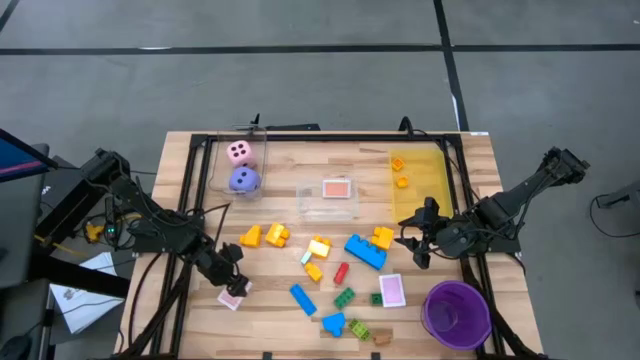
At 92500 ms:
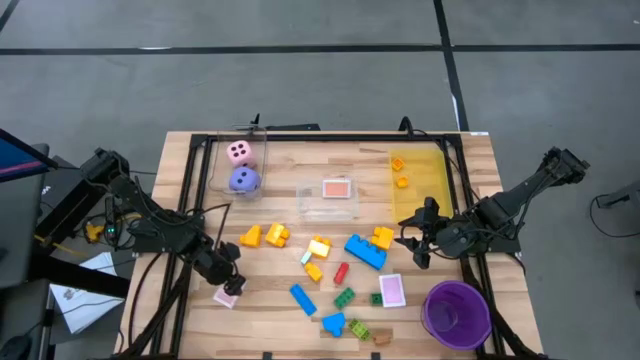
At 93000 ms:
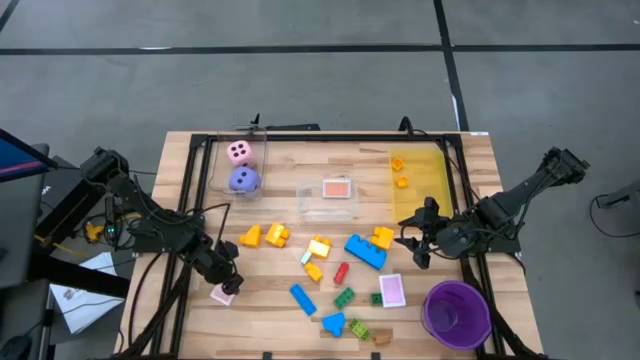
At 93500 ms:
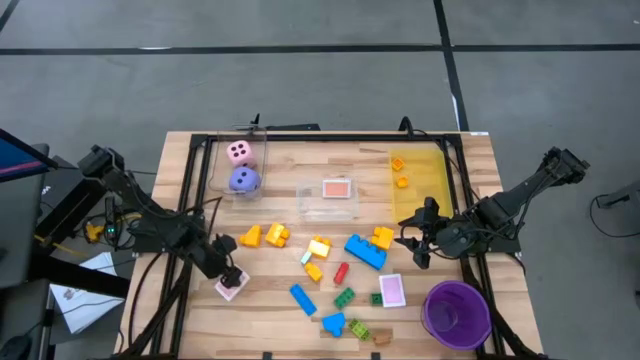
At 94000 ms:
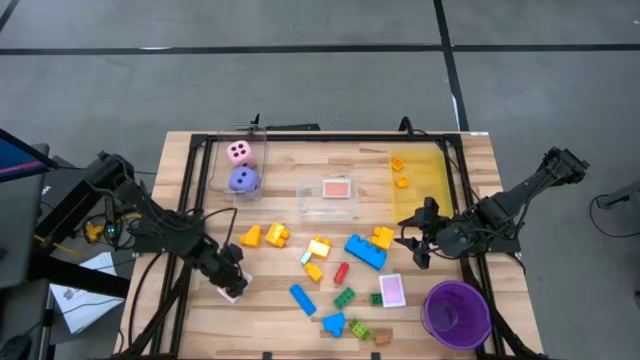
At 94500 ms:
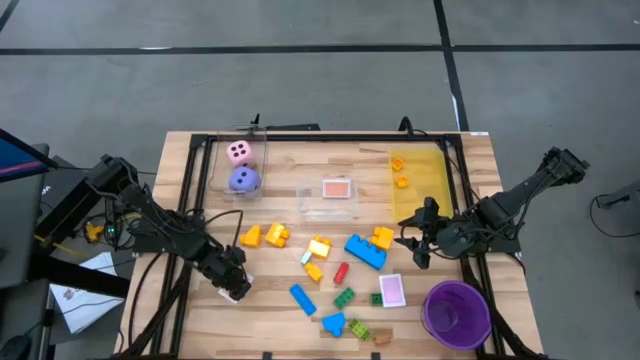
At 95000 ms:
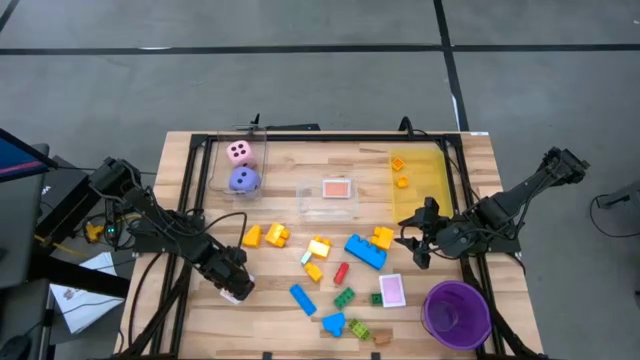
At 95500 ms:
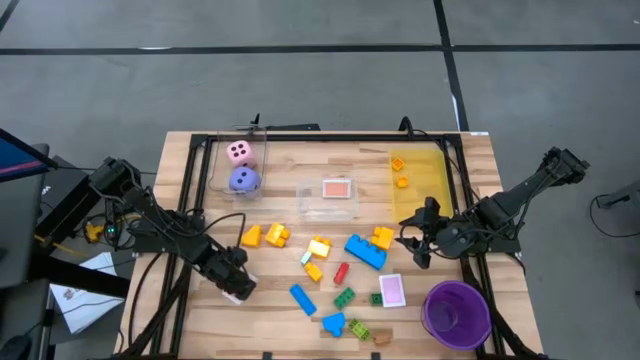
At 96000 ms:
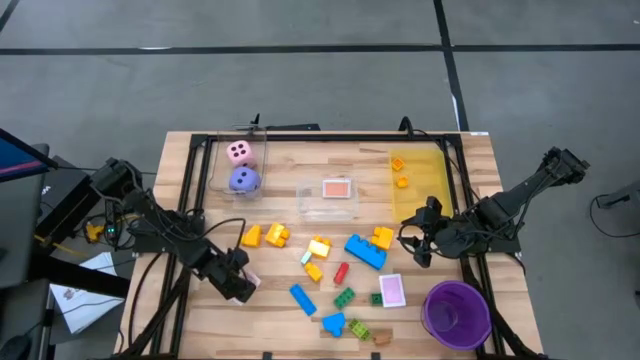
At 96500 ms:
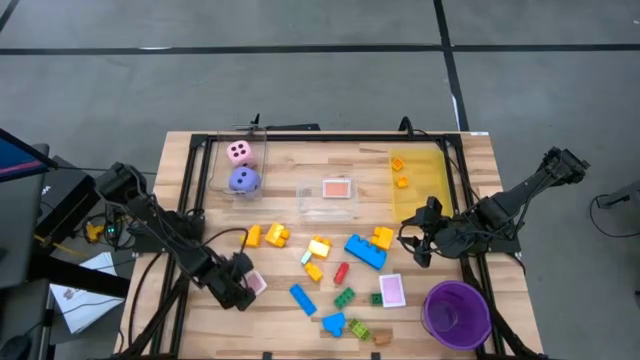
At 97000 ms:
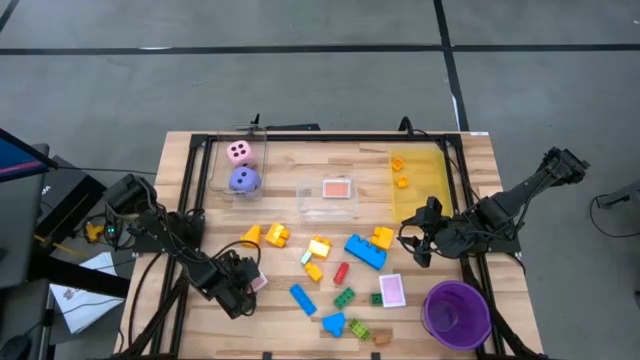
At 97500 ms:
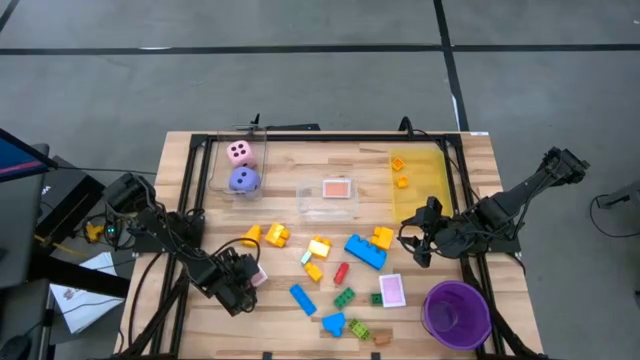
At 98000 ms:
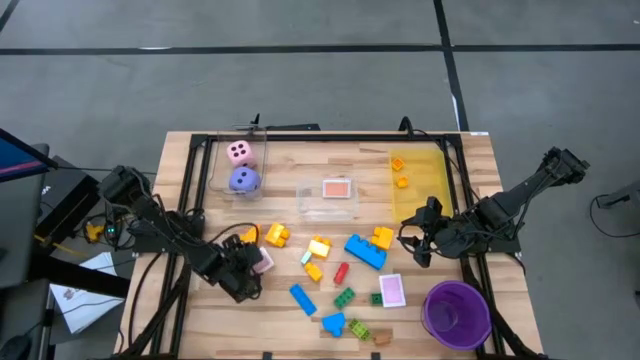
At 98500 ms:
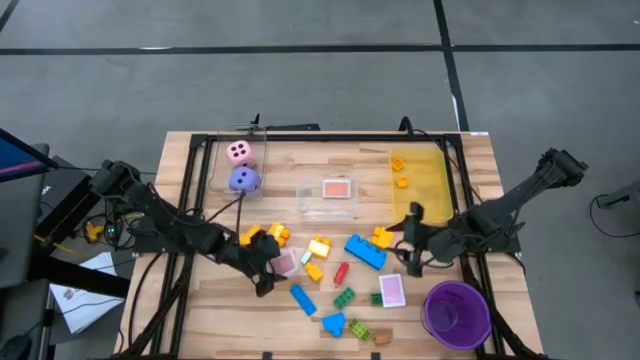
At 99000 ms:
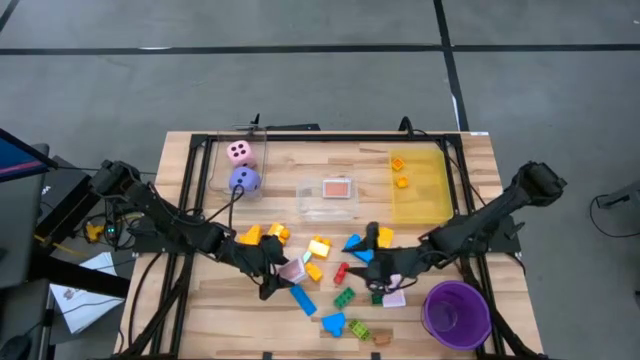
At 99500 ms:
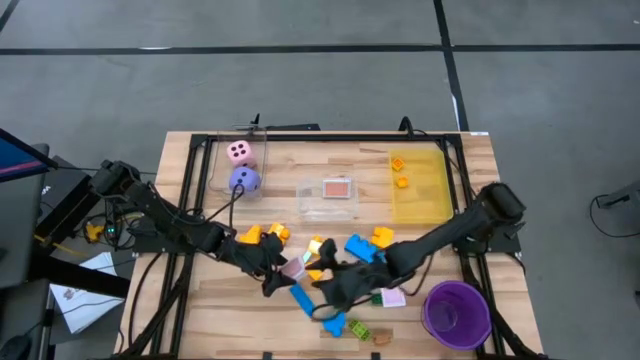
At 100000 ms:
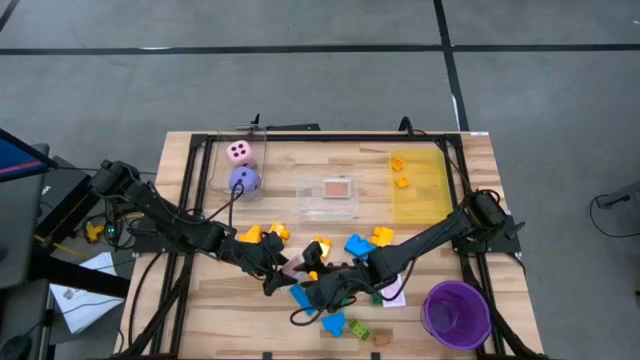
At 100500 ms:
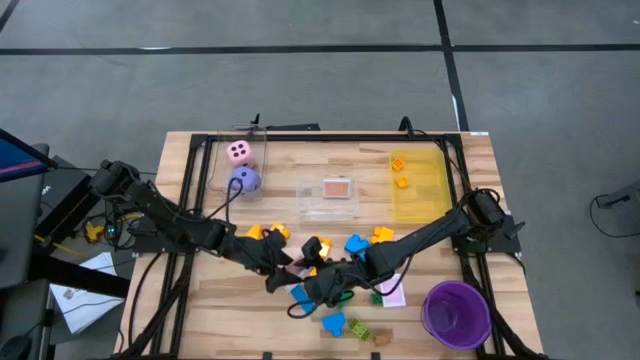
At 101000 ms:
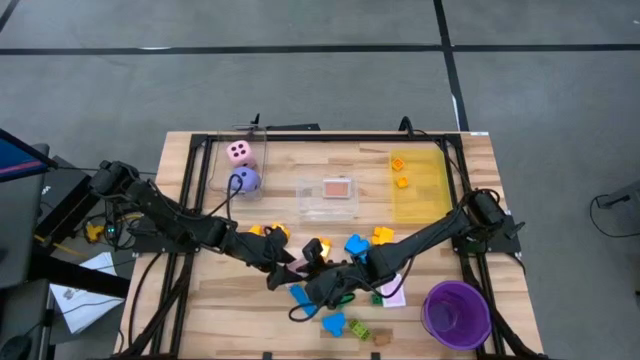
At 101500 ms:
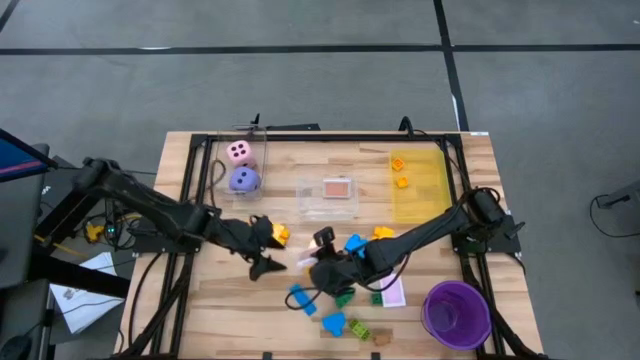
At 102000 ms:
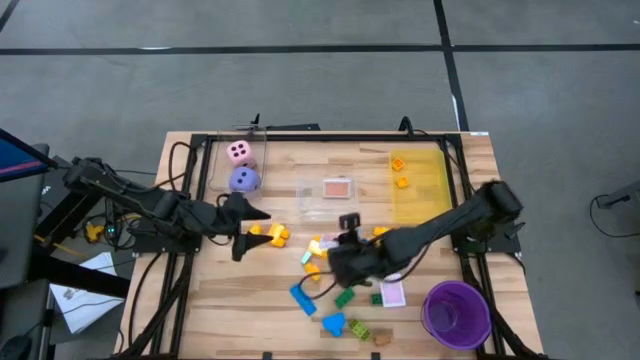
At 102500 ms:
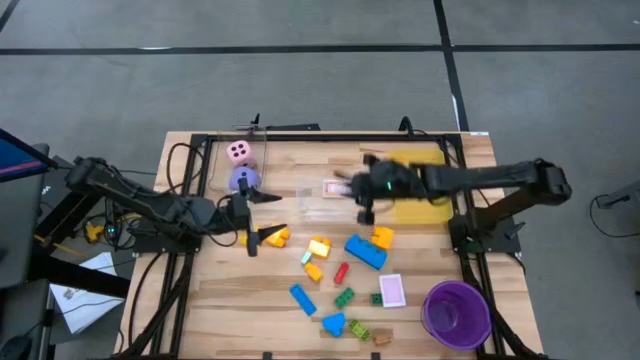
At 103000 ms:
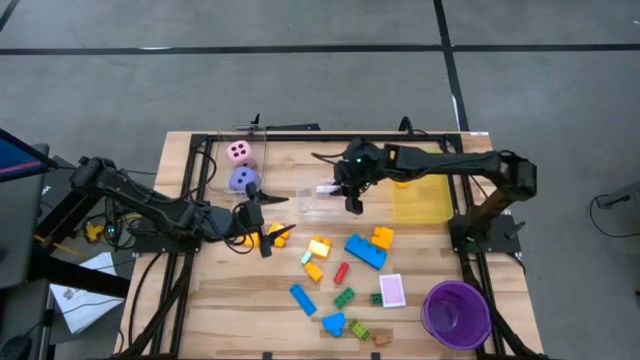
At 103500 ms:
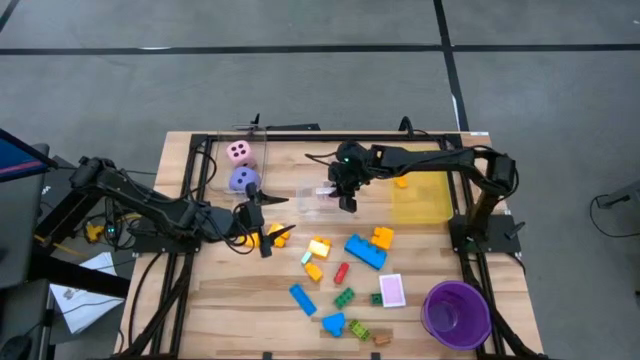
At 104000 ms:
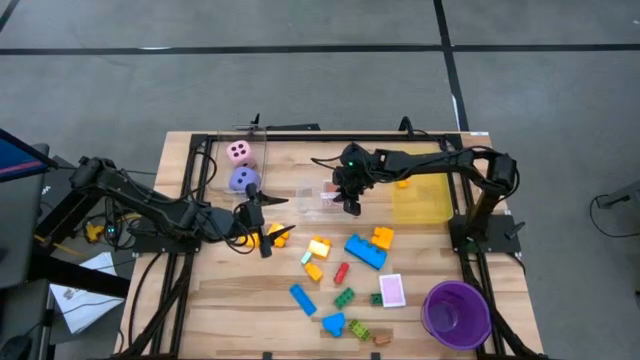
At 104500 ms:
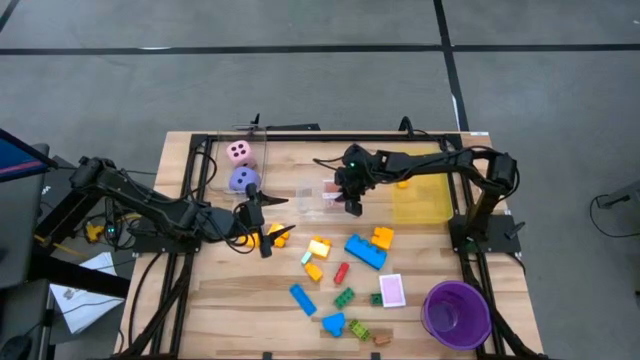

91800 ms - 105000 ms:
Task: Pick & Place Toys
Put the red deck of cards into the bottom transparent bin

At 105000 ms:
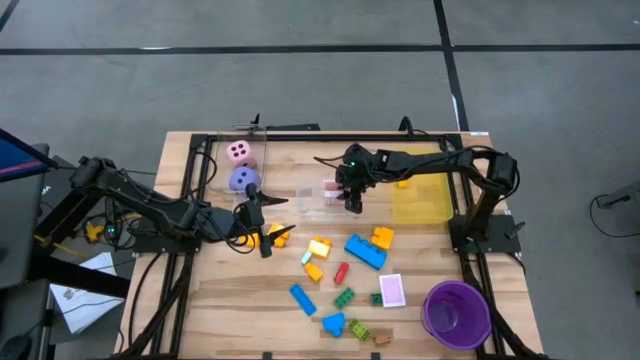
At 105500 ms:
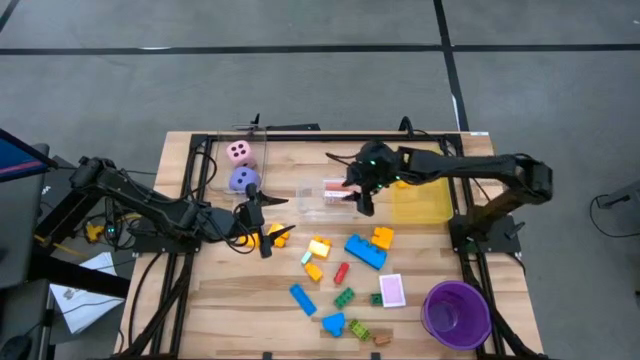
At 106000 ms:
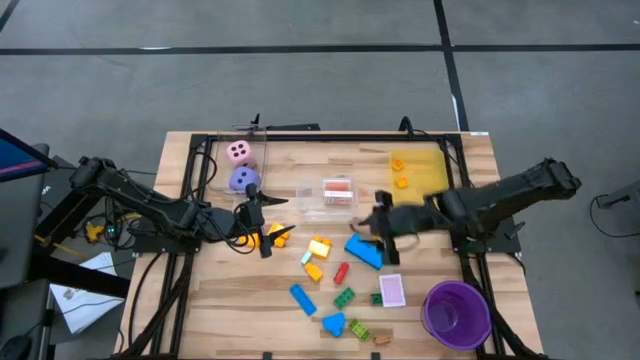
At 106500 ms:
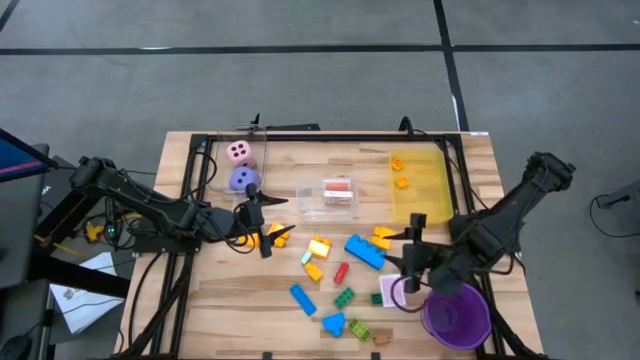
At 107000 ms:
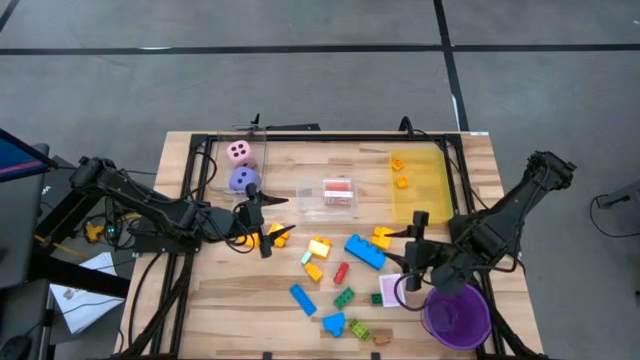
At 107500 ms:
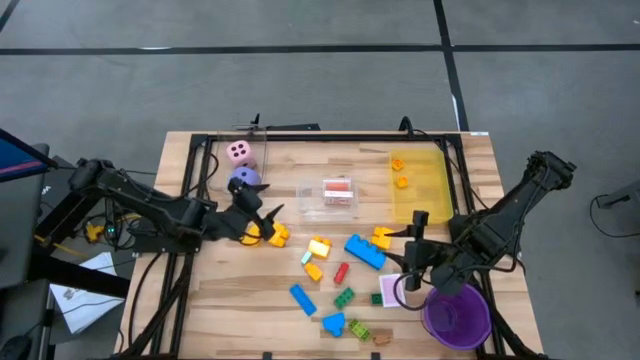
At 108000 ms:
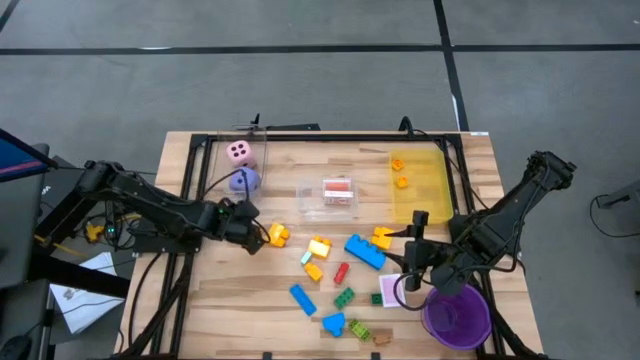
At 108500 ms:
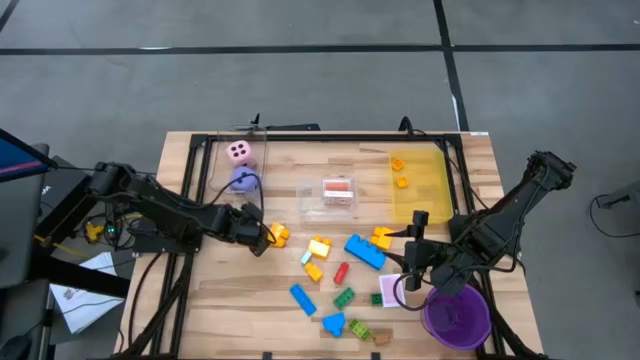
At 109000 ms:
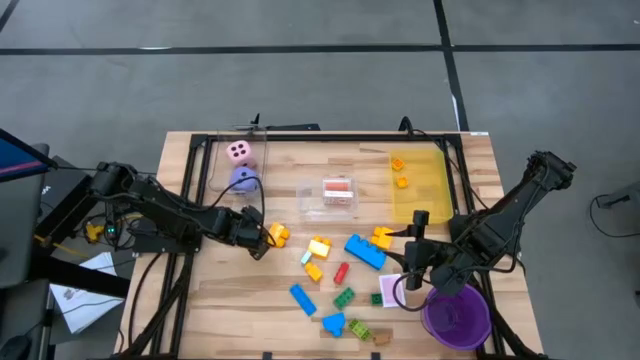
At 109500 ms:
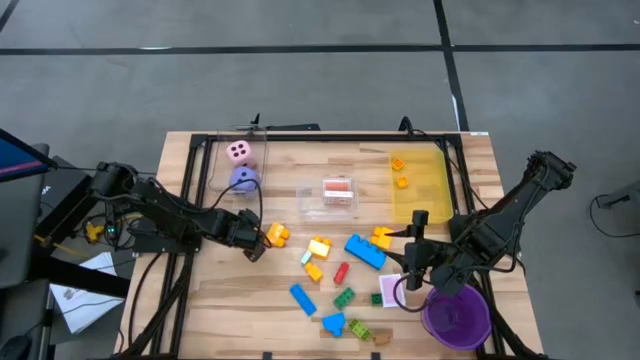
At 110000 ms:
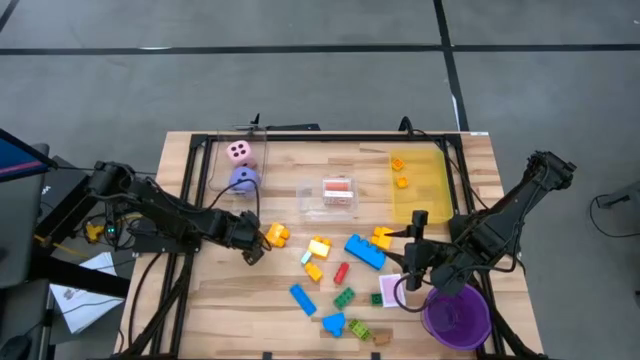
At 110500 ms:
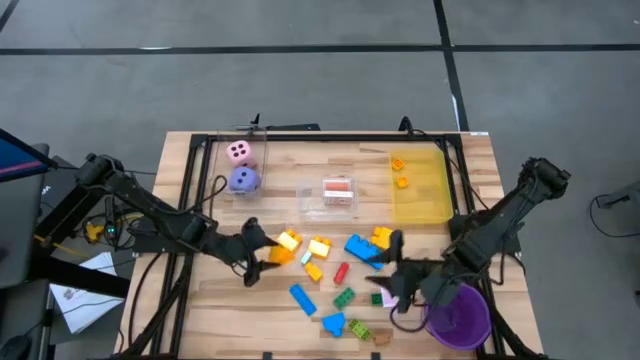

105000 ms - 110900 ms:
Put the yellow game piece into the yellow bin

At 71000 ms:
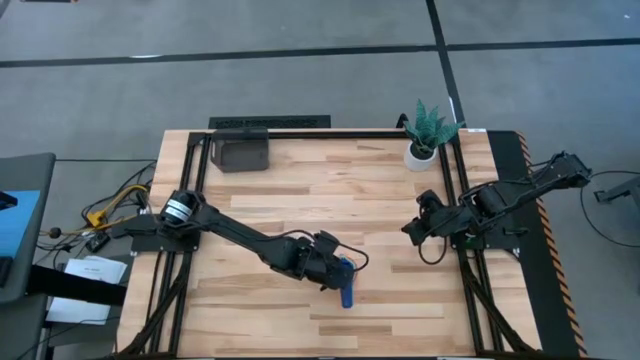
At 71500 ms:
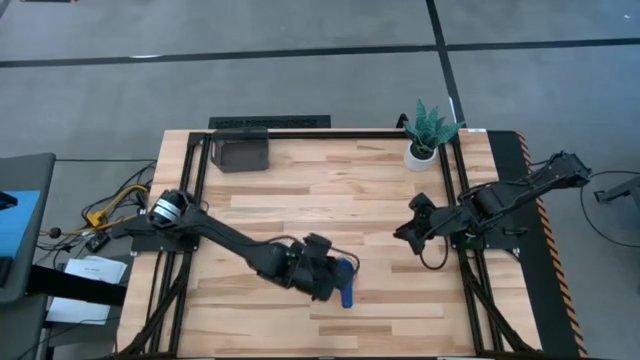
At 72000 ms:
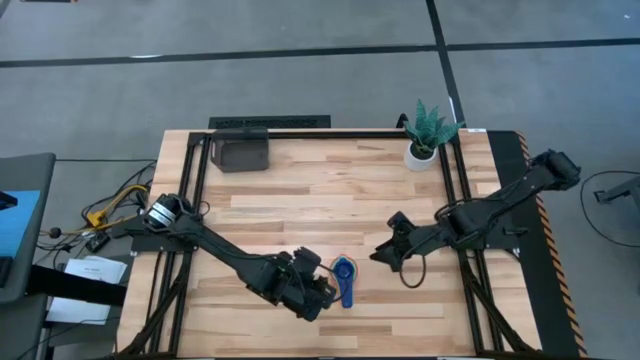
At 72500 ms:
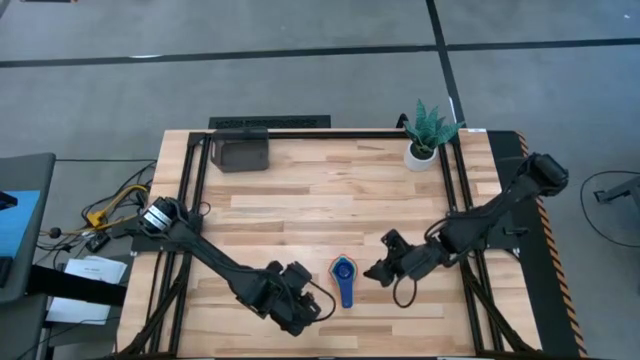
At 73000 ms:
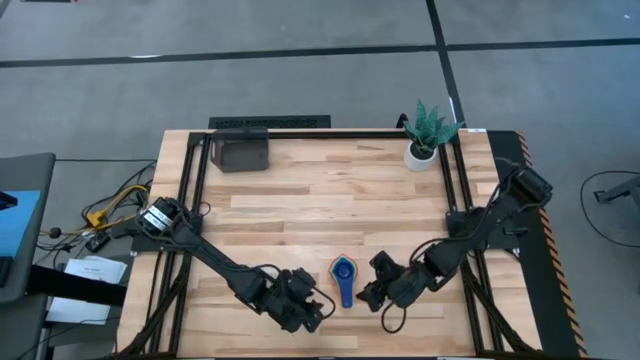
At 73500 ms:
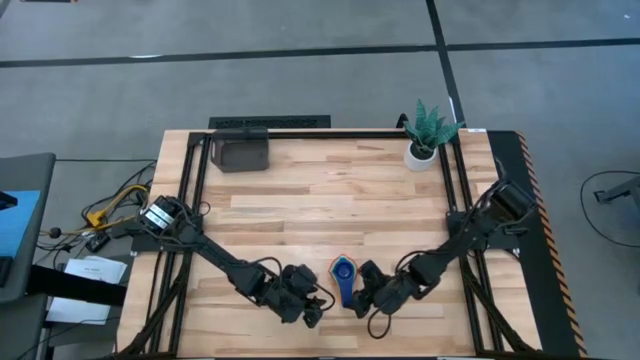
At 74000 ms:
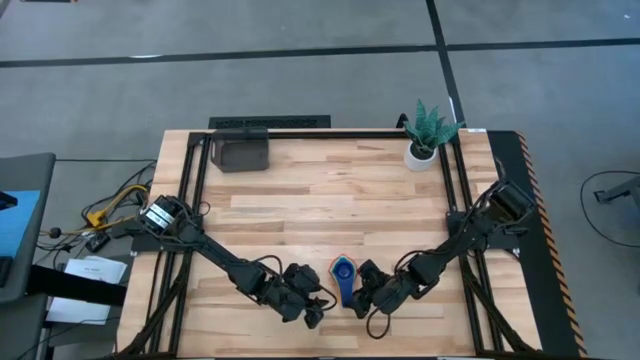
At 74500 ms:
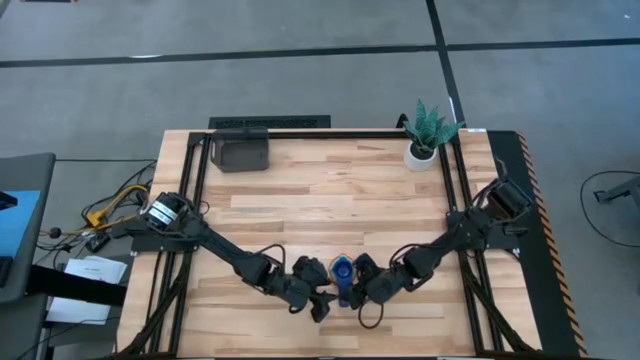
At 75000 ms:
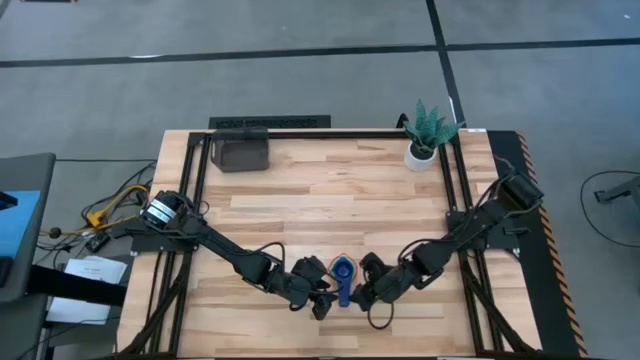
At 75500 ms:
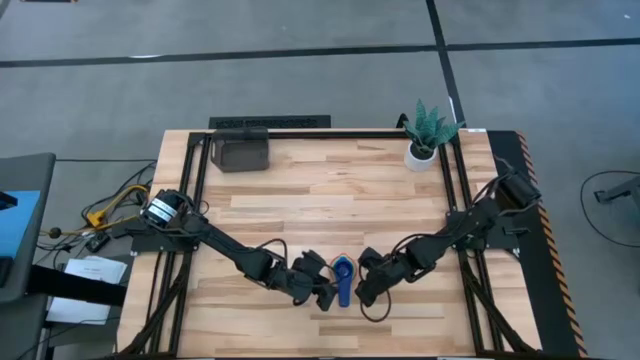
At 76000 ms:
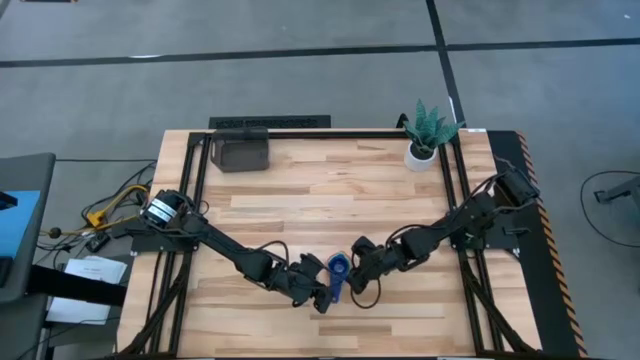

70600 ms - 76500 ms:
Task: Nest measuring cups in basket
Adjust the nested measuring cups
